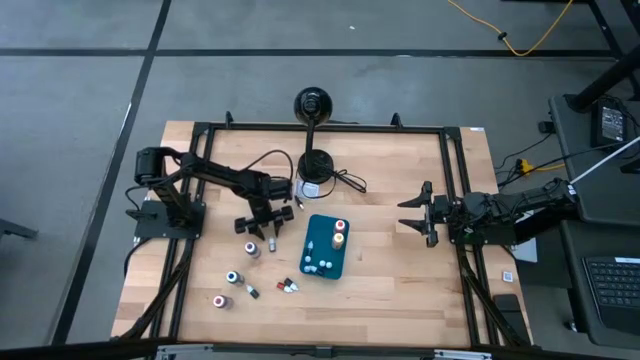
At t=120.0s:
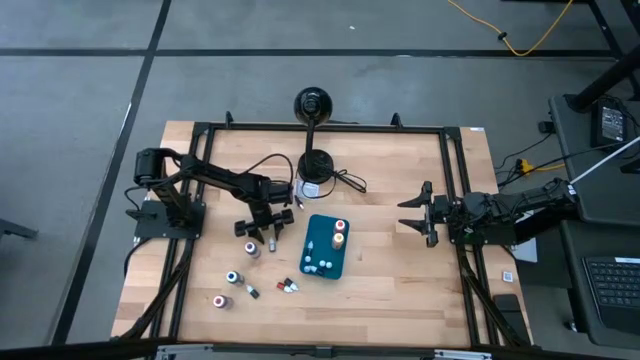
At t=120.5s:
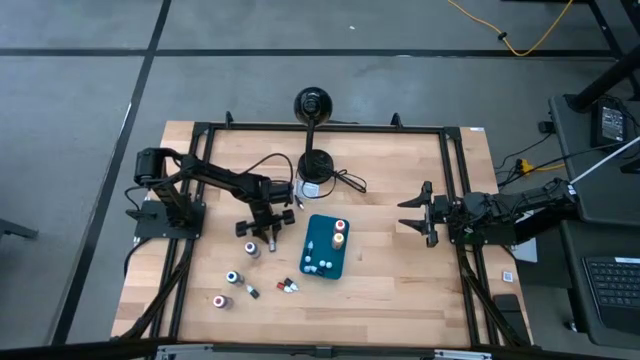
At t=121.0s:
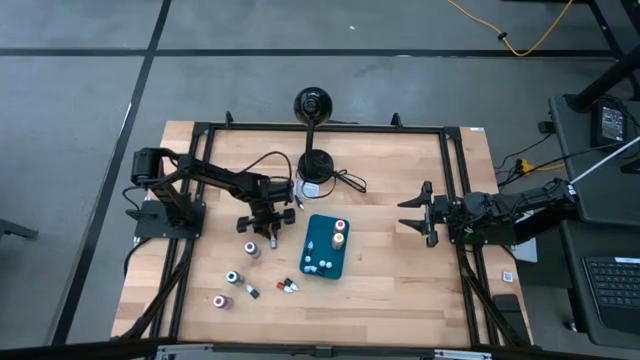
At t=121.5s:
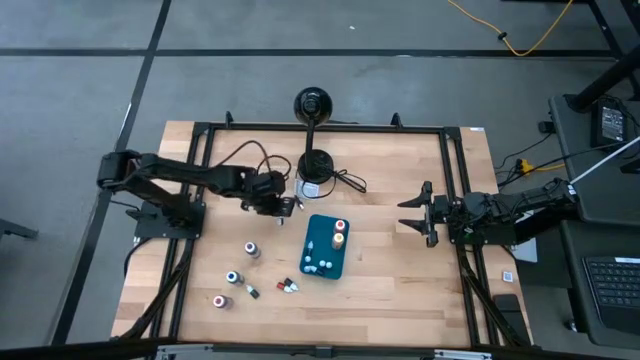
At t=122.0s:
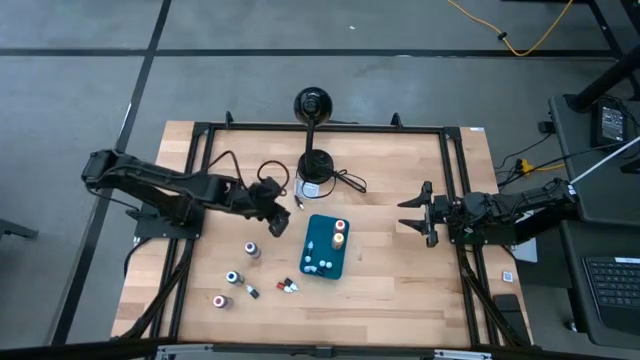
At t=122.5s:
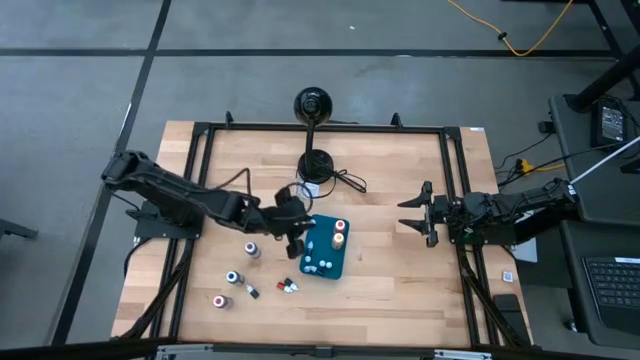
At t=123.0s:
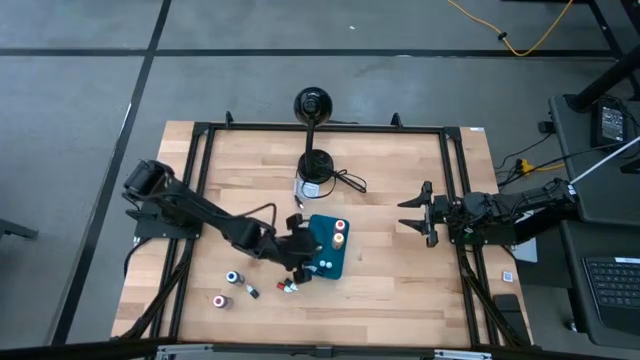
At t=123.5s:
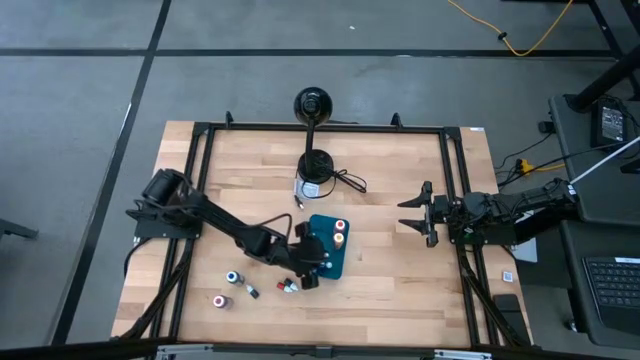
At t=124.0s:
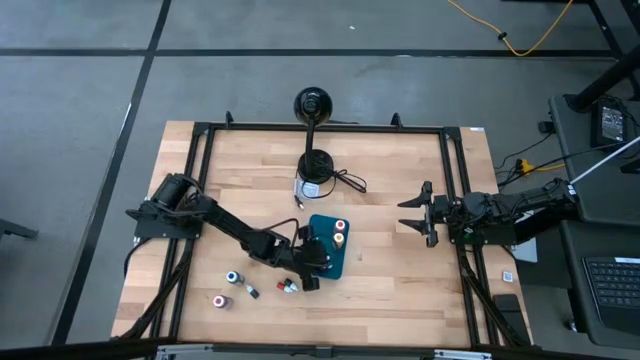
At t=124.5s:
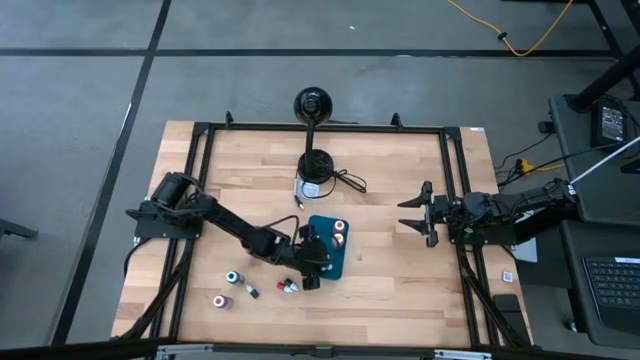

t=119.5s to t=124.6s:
Task: Pick & Place food coloring
Put the brown small food coloring bottle into the bin

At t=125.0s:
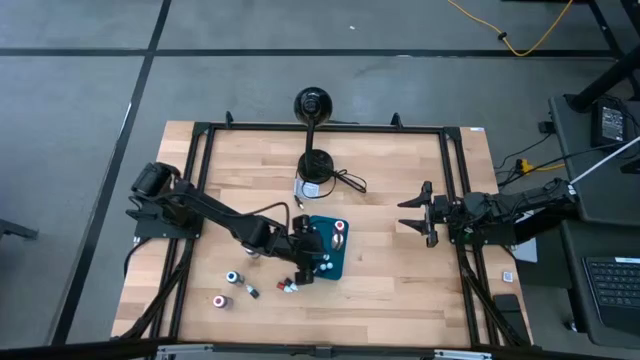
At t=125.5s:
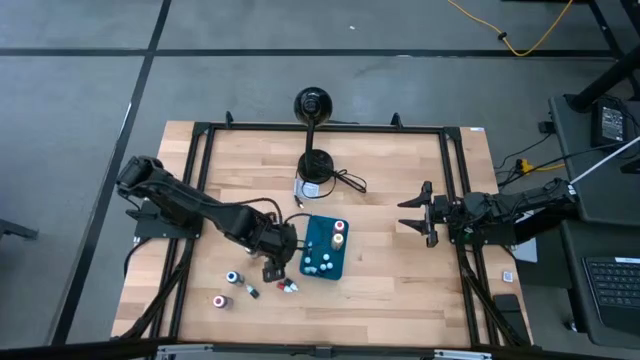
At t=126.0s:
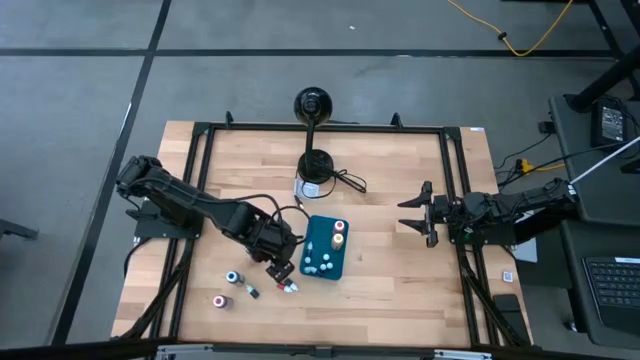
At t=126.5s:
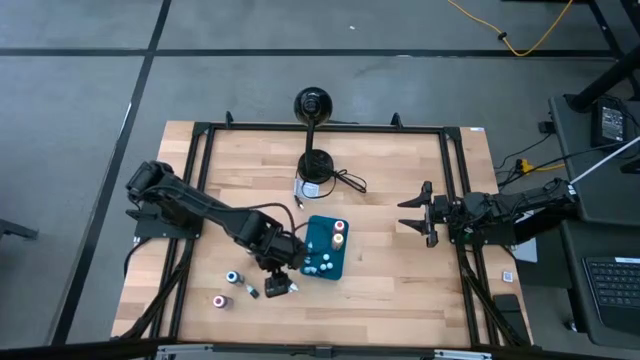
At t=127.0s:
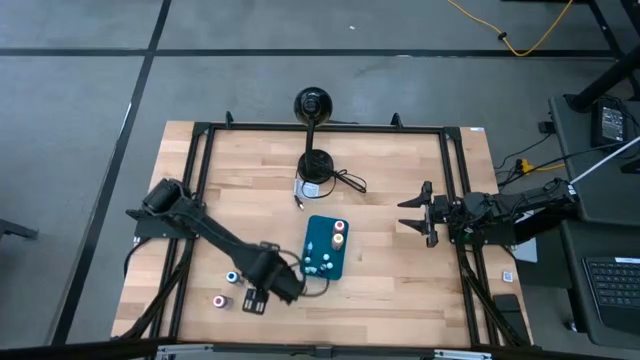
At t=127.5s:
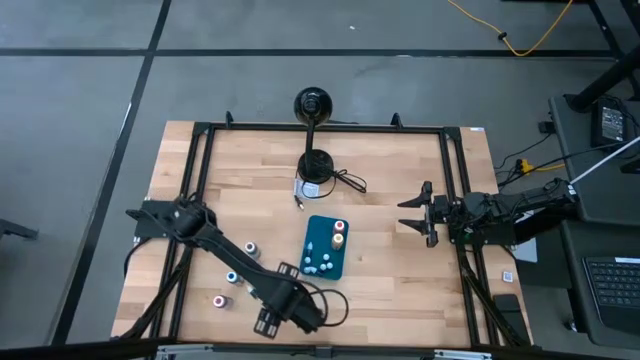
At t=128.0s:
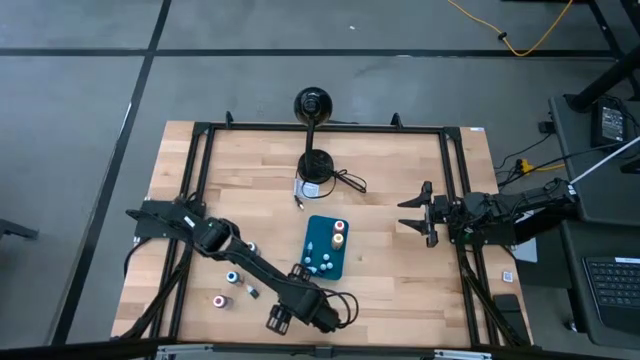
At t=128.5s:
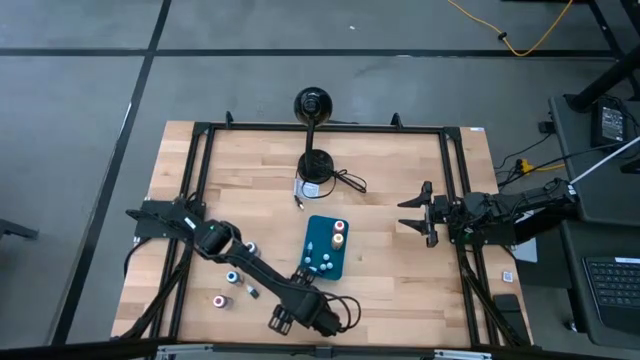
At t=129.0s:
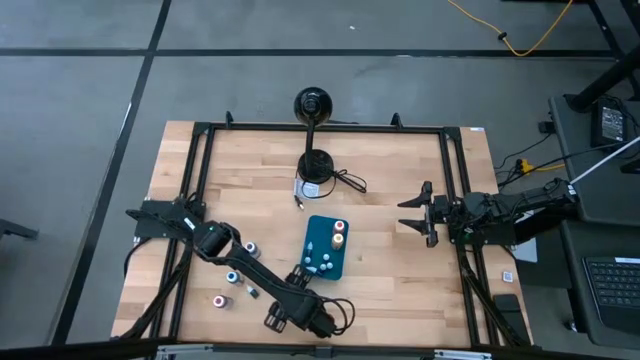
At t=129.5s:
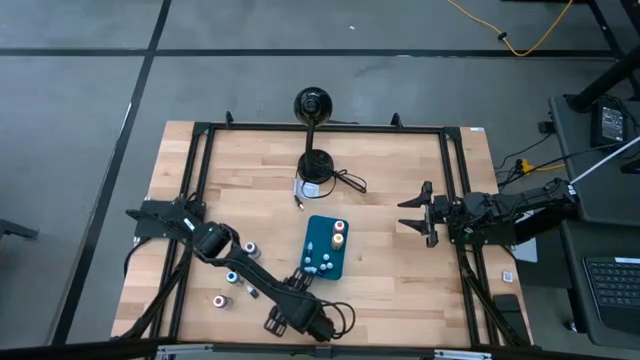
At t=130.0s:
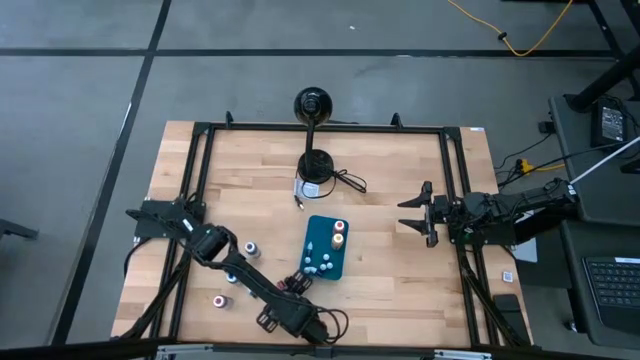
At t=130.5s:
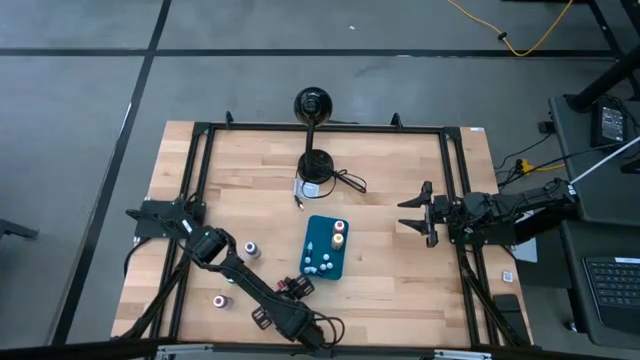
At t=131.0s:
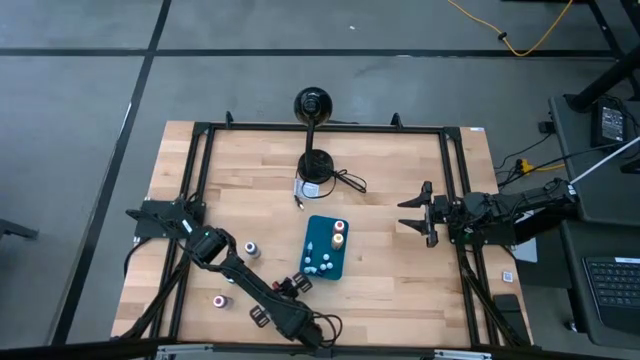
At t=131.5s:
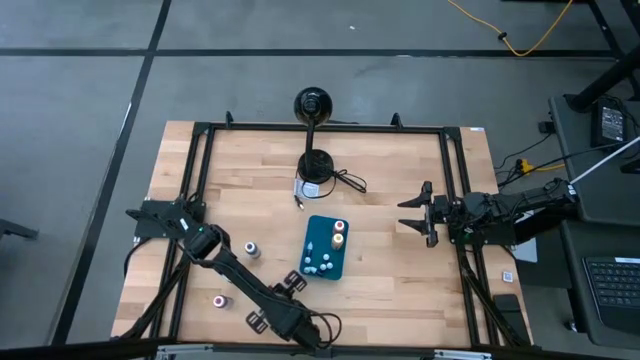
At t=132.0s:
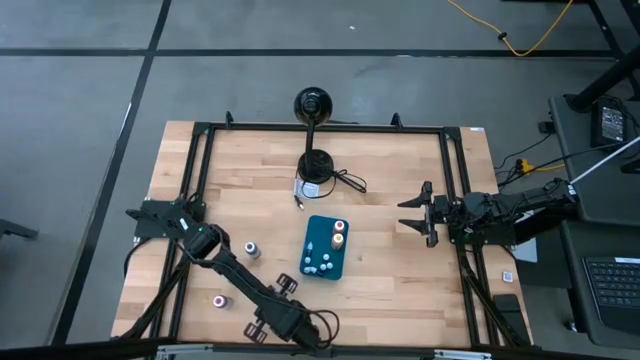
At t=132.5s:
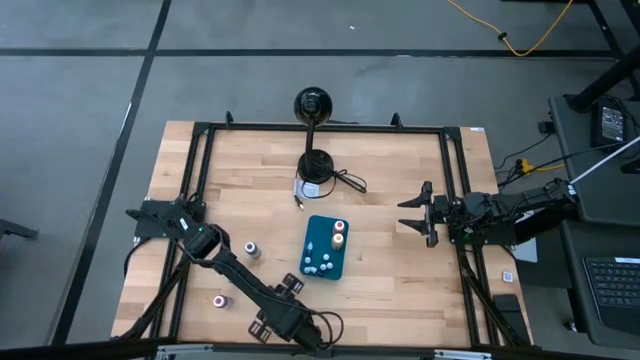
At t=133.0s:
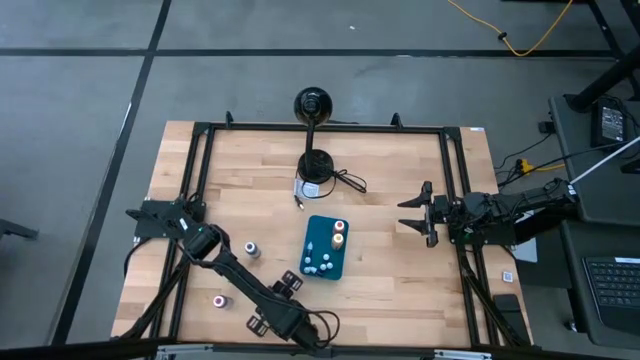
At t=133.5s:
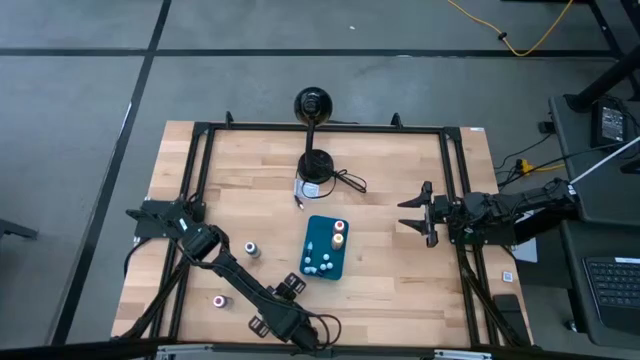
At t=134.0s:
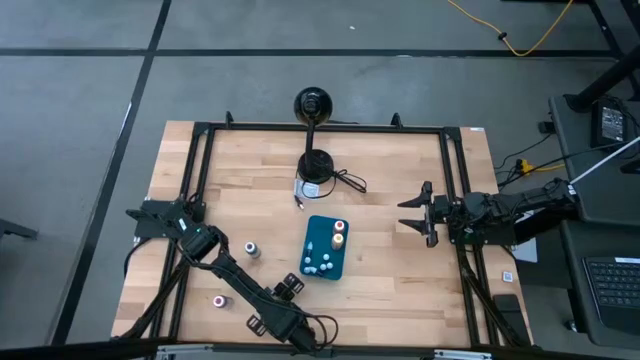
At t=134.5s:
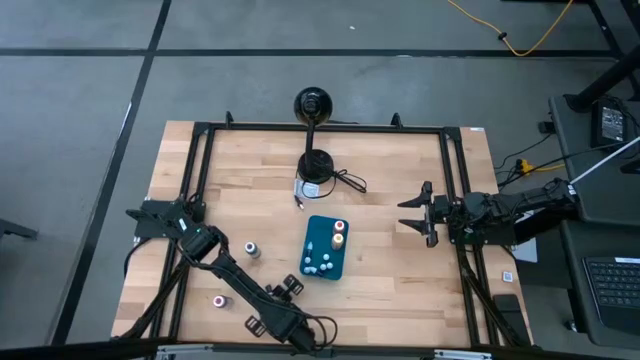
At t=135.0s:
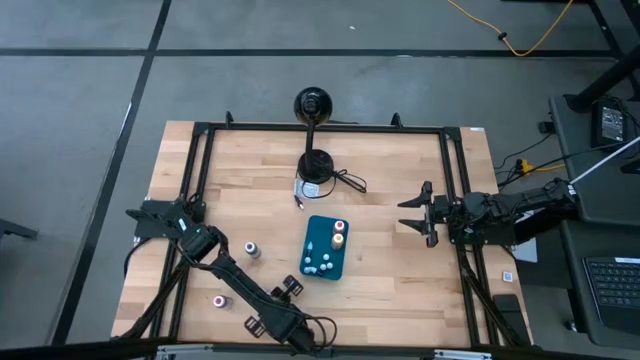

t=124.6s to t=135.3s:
Put the red small food coloring bottle into the bin

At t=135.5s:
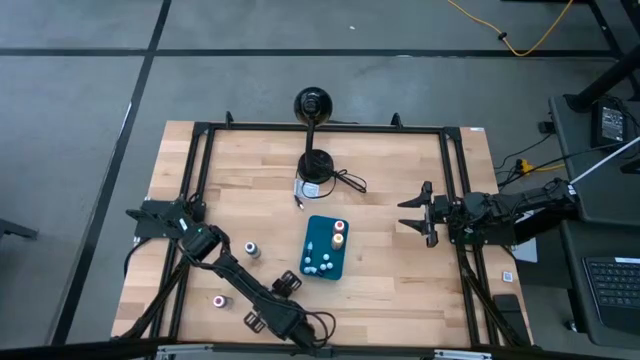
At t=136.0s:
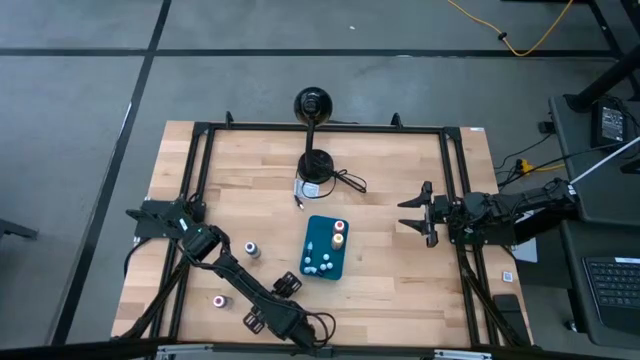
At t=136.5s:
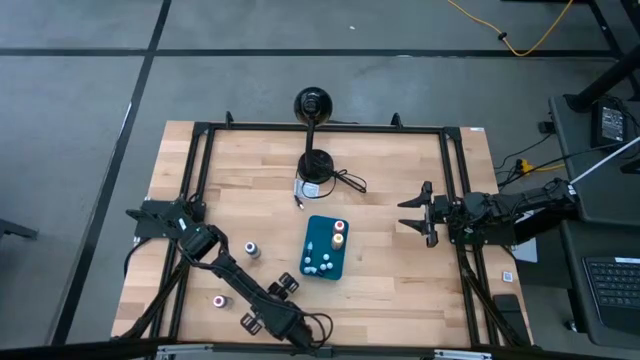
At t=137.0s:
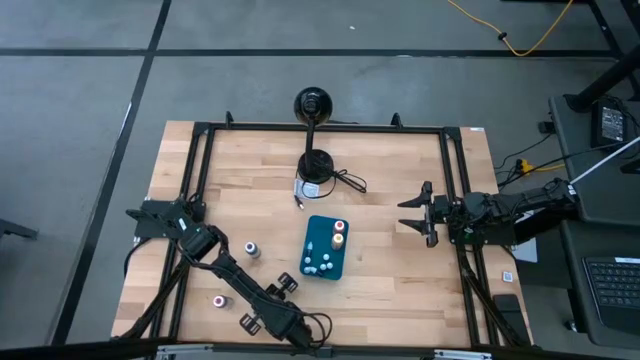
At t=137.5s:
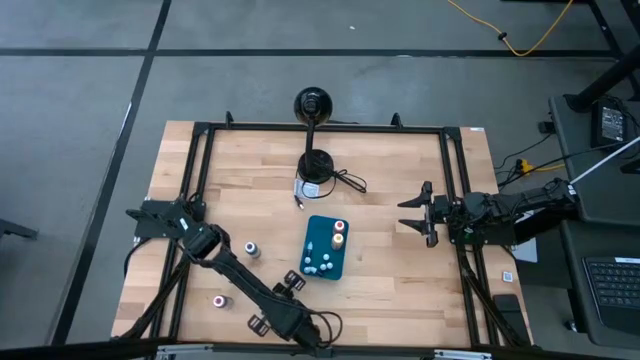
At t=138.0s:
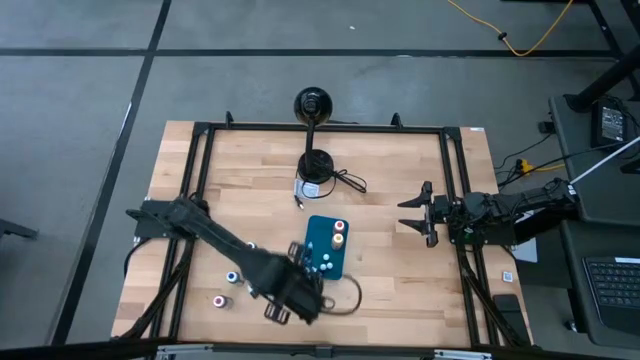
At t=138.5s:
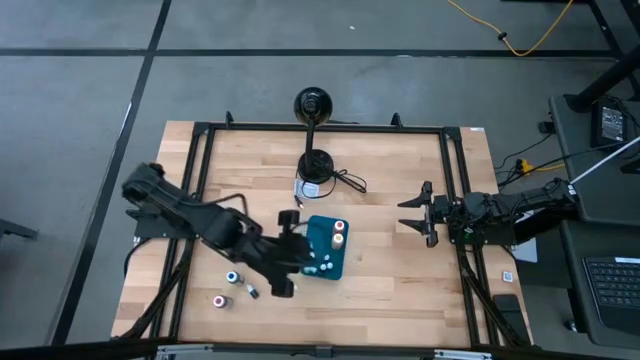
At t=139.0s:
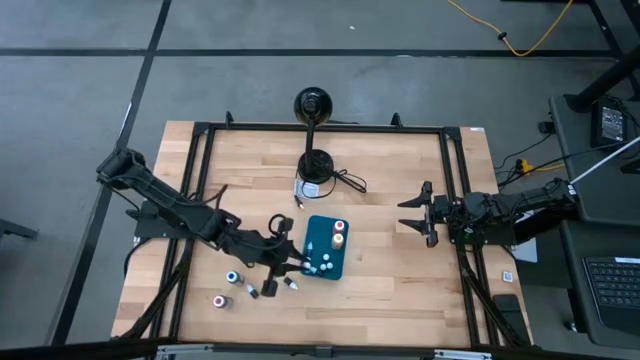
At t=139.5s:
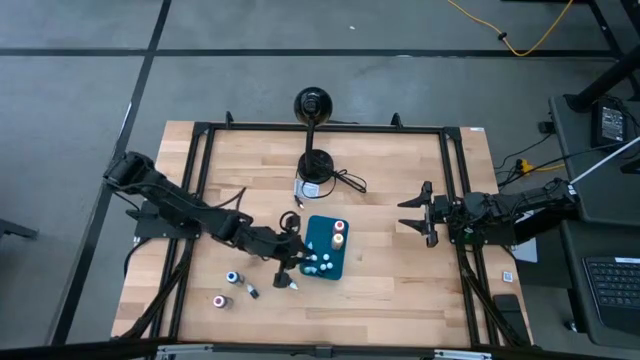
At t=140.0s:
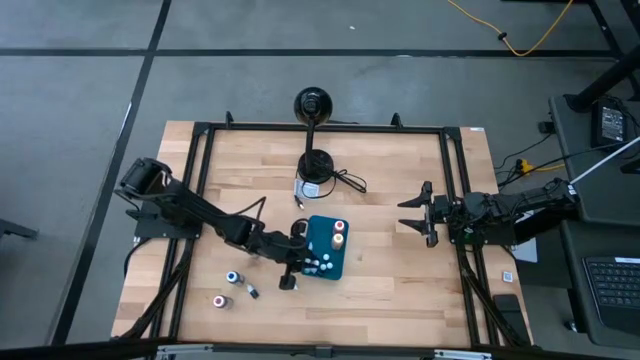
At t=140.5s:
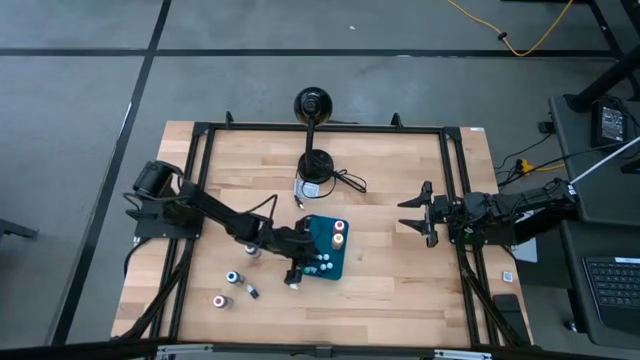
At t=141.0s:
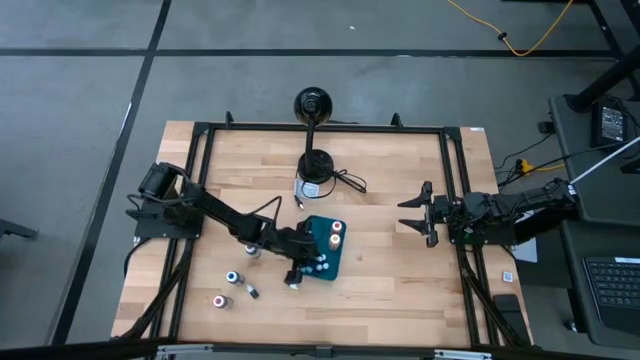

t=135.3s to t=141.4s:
Put the red small food coloring bottle into the bin
